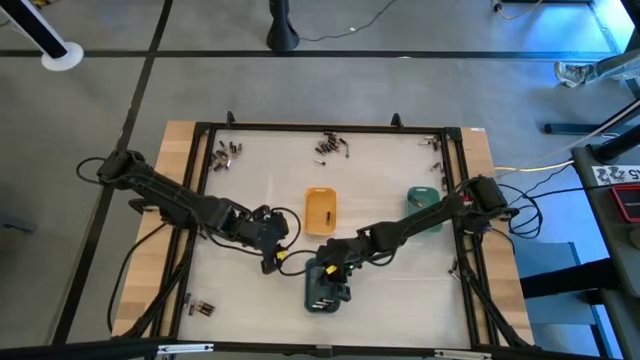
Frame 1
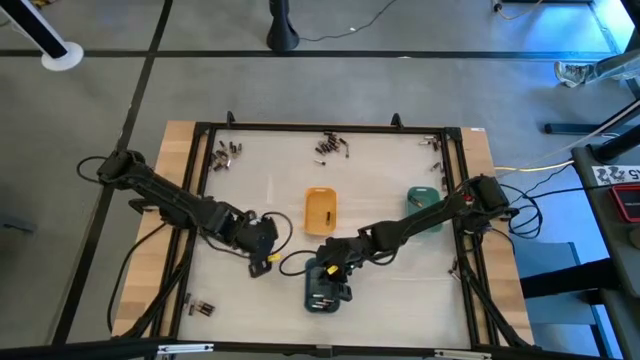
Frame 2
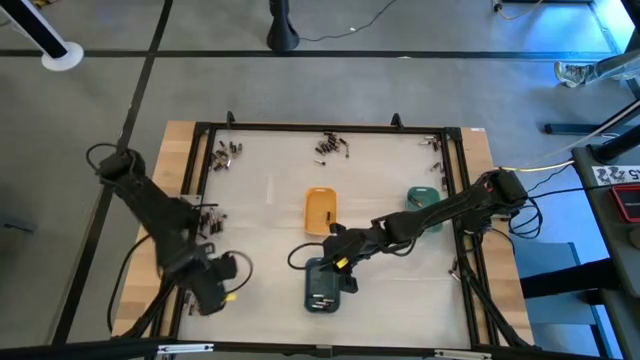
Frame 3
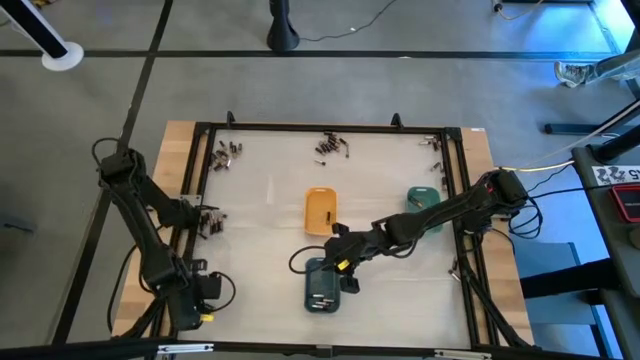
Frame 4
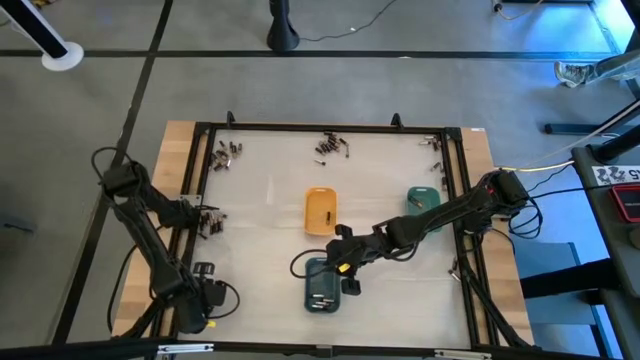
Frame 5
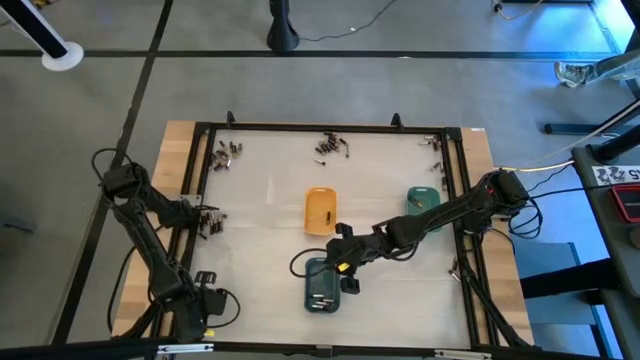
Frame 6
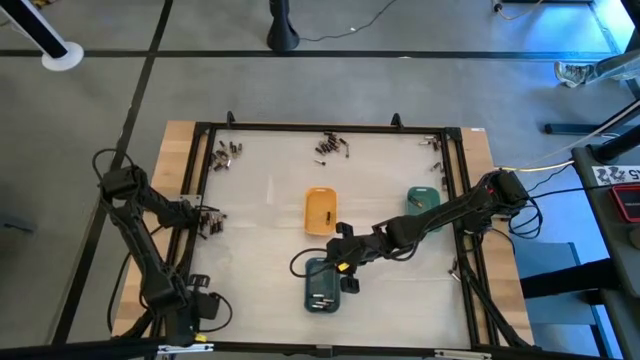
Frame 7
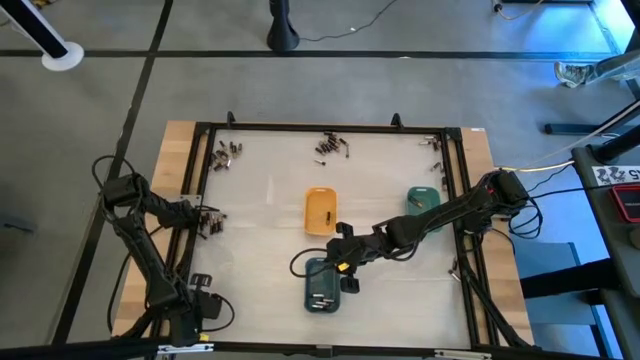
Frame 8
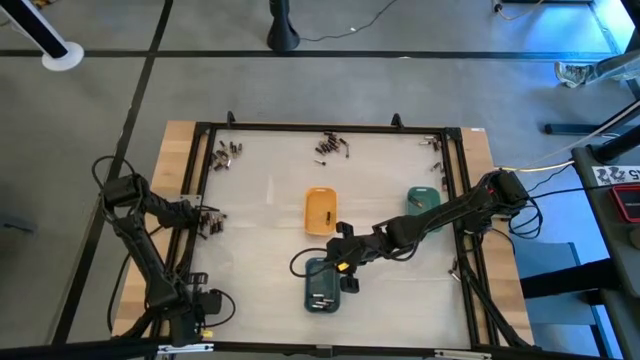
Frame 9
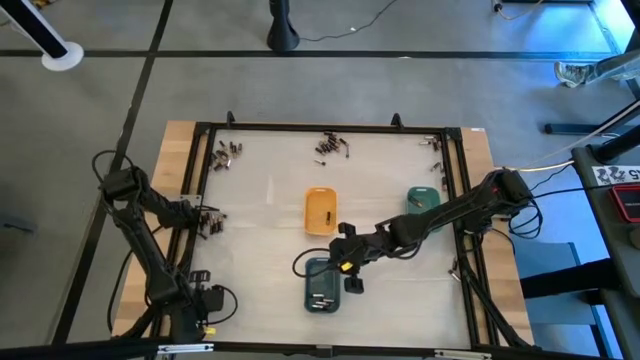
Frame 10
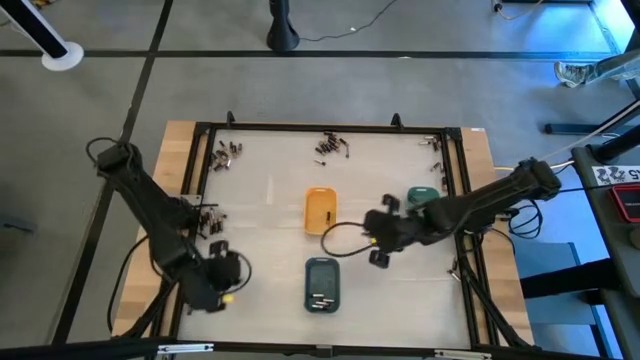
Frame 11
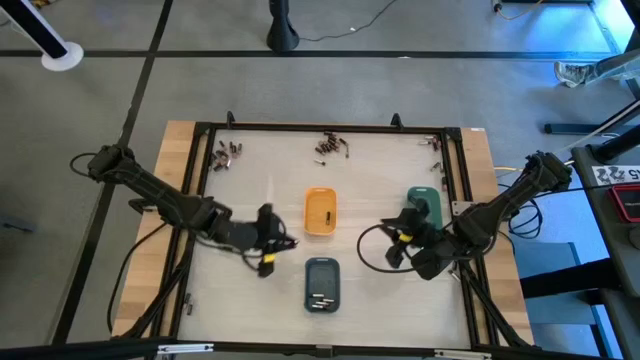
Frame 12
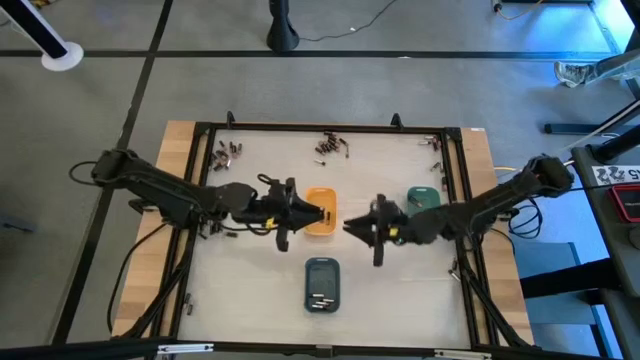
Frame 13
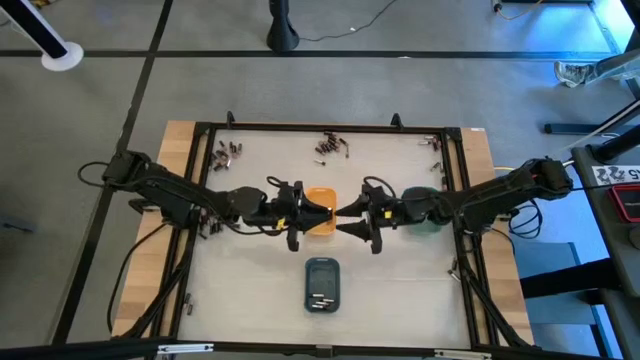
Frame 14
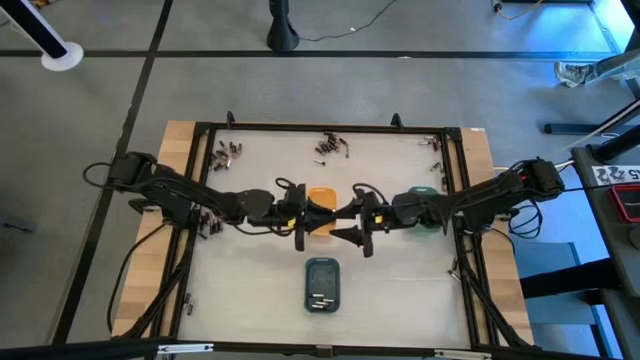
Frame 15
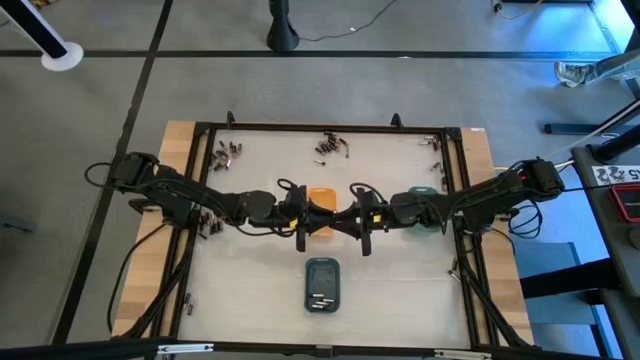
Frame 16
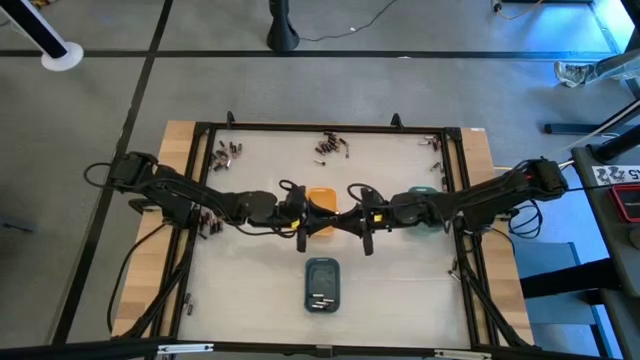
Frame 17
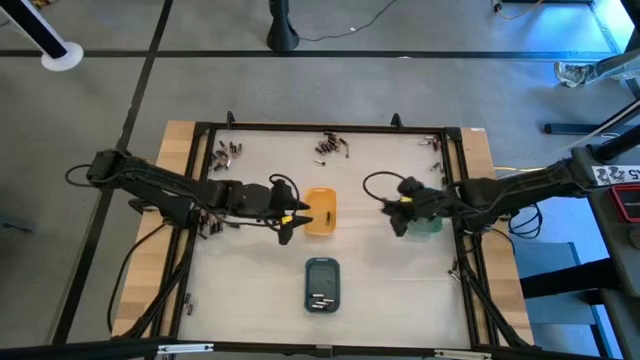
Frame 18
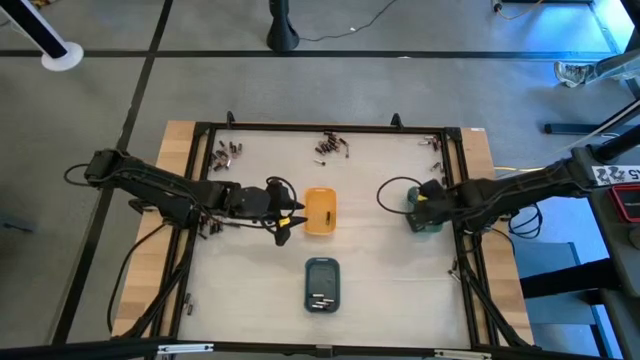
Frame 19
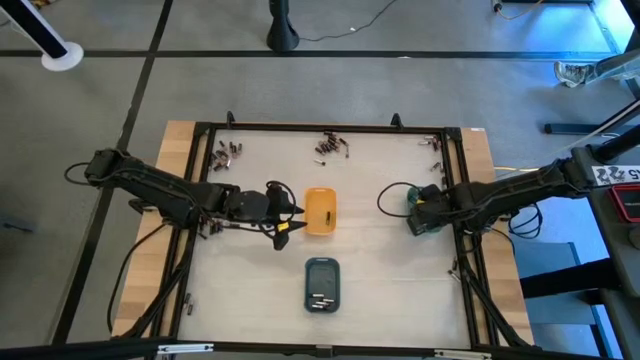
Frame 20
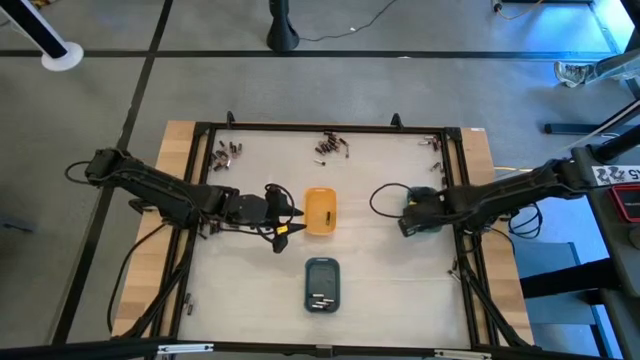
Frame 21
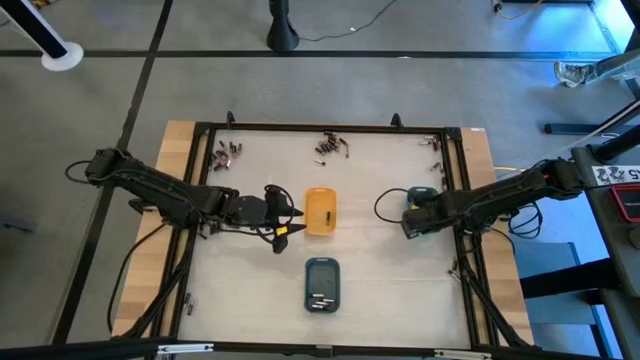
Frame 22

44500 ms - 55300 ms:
Task: Sort batteries
Put the silver battery into the green bin

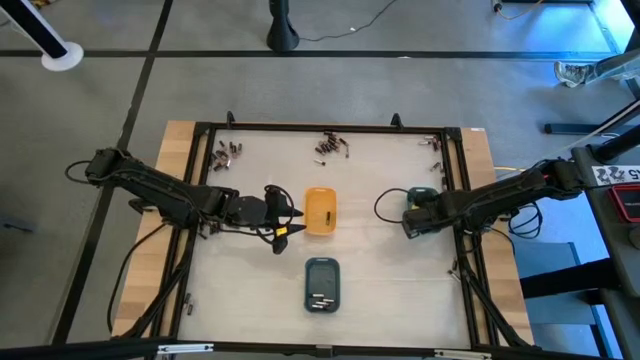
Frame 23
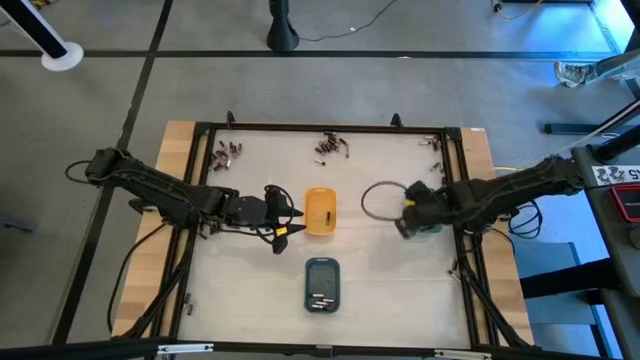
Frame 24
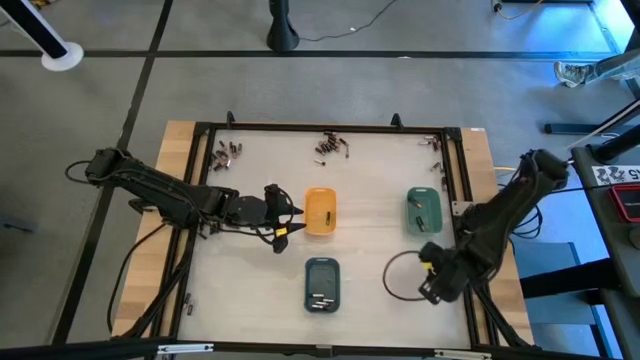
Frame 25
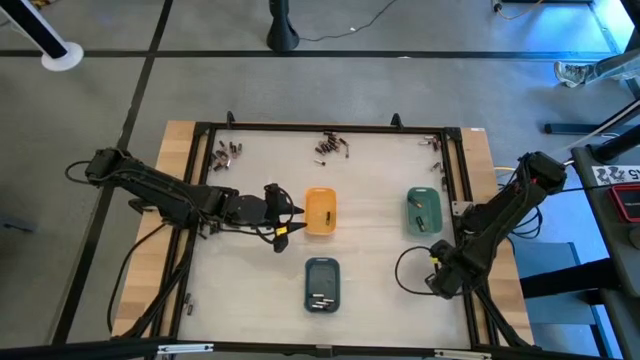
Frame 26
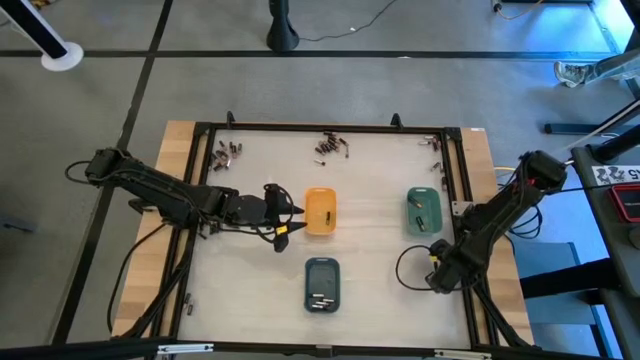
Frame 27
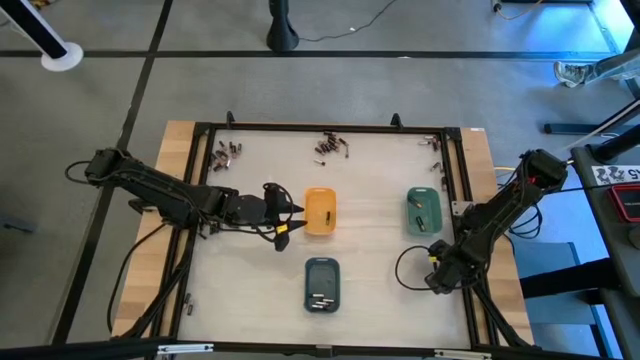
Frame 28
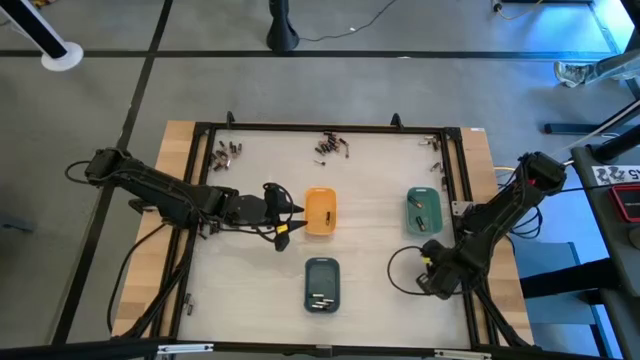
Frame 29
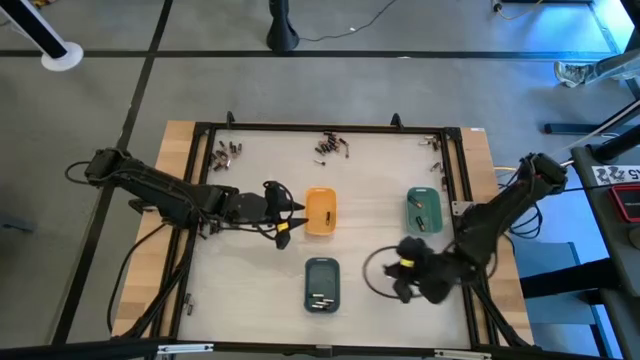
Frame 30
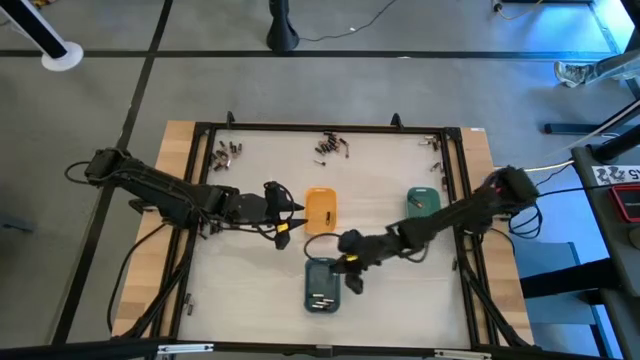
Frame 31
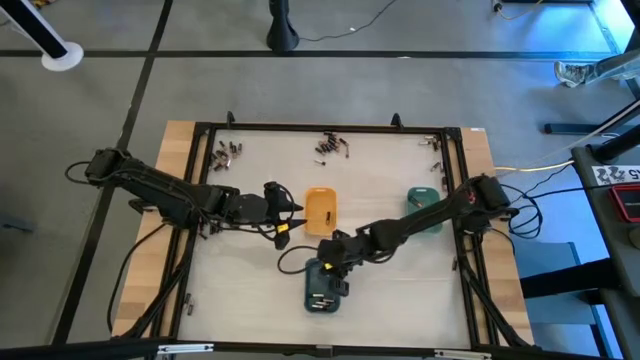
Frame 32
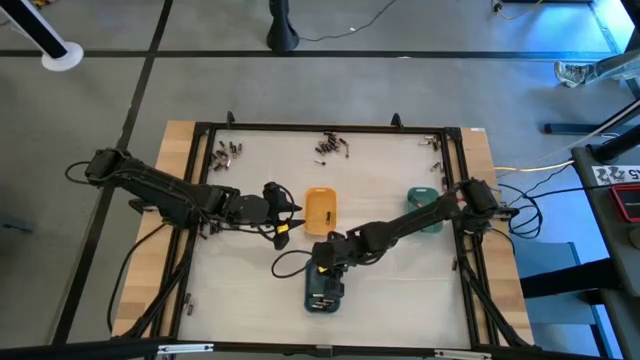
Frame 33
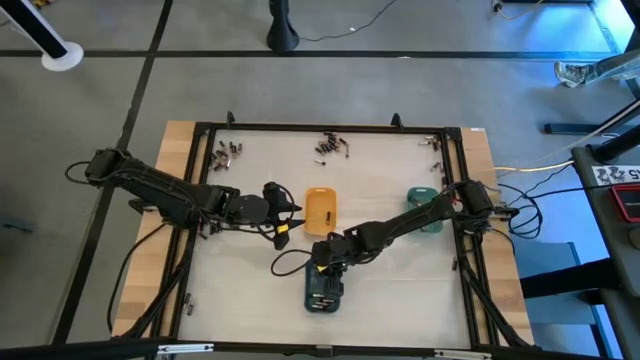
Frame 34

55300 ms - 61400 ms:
Put the silver battery into the blue bin

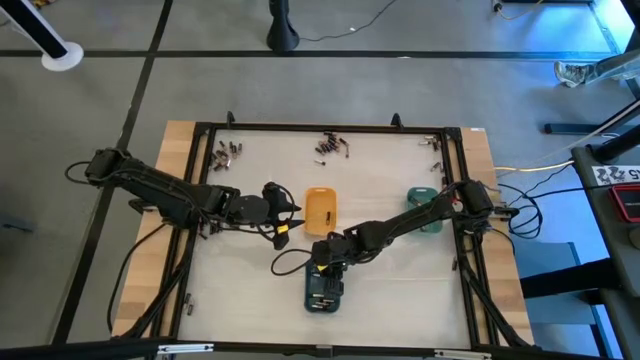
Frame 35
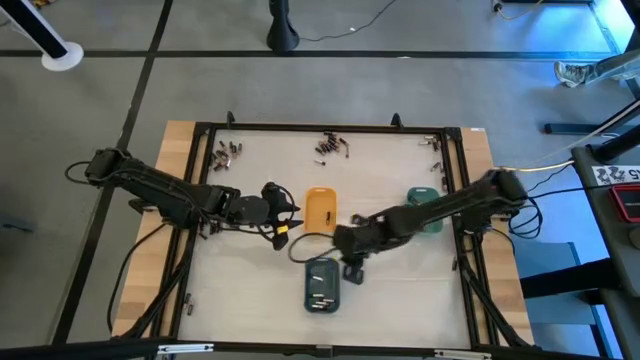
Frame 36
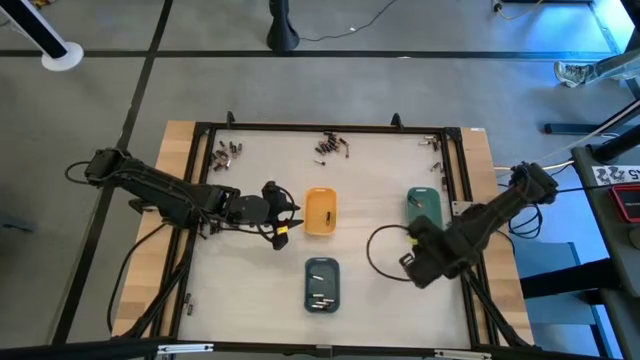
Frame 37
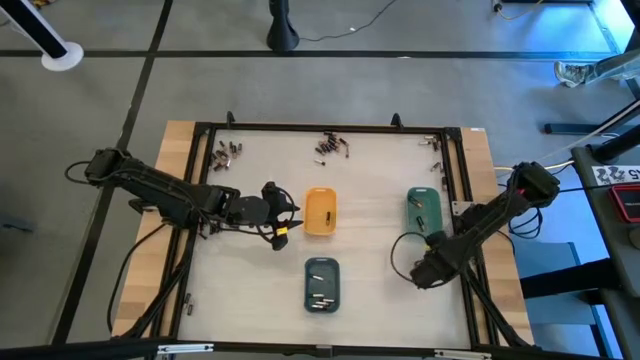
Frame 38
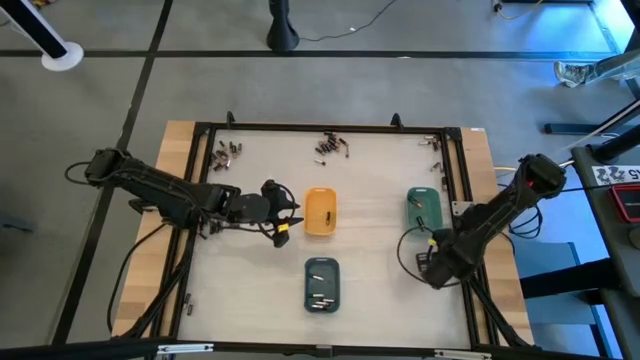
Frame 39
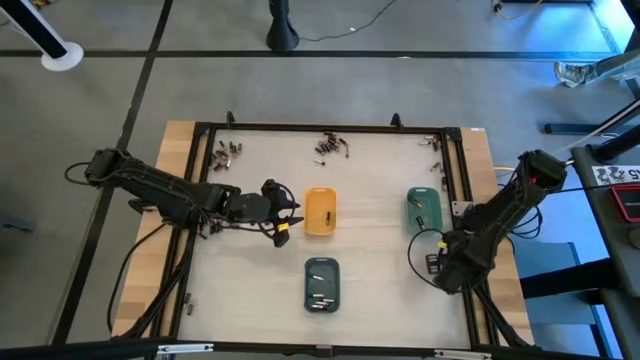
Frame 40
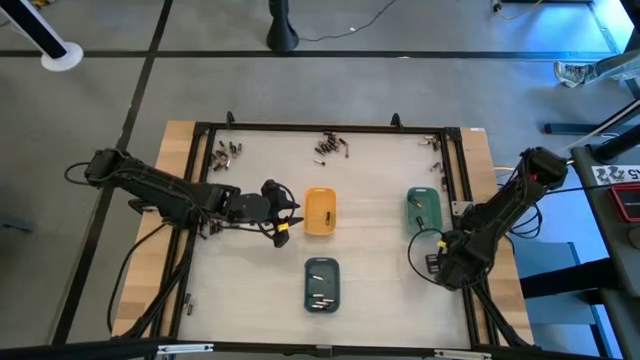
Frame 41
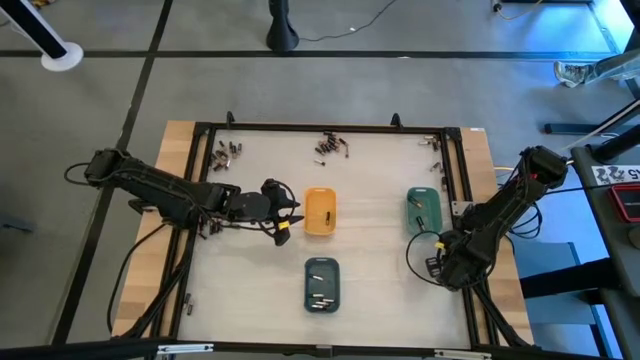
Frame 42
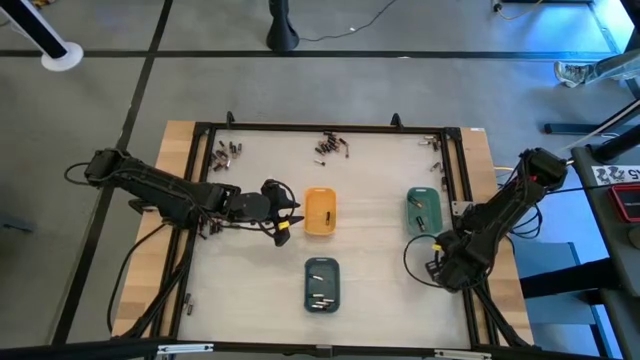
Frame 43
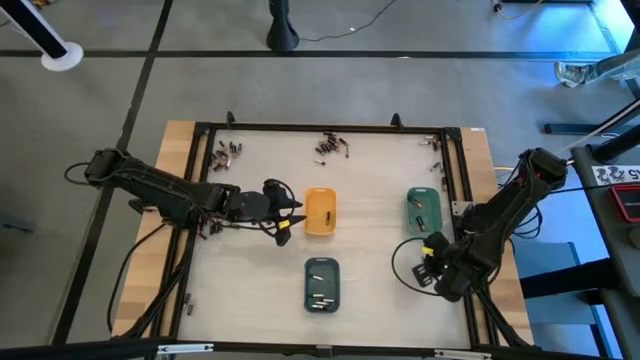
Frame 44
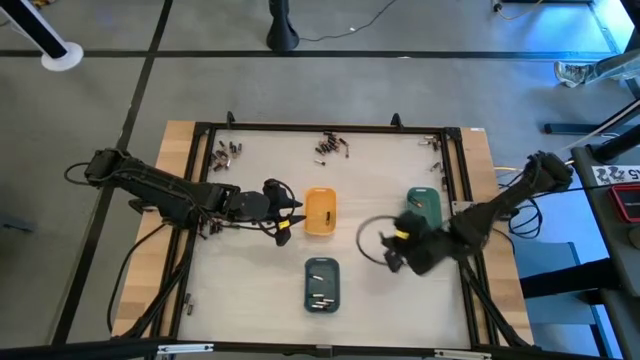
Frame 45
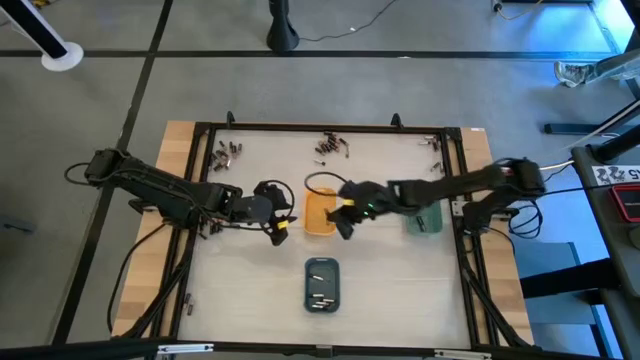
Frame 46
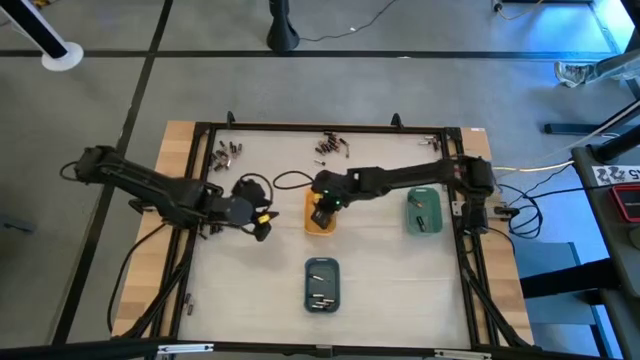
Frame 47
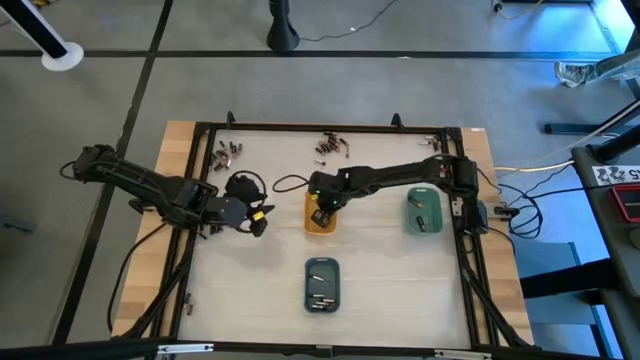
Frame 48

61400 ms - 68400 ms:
Put the black battery into the yellow bin
